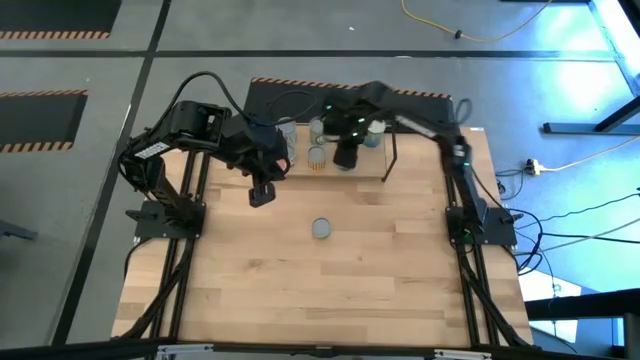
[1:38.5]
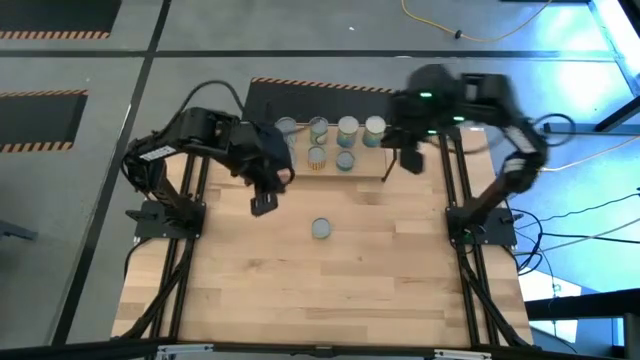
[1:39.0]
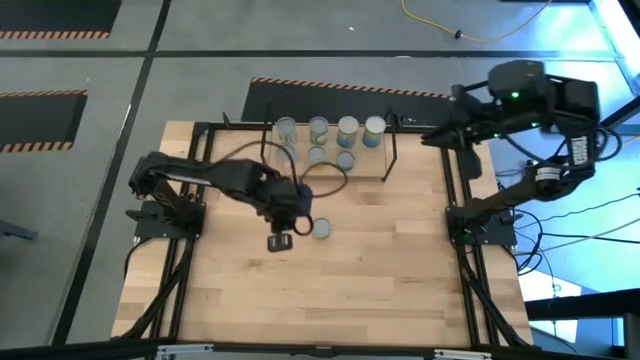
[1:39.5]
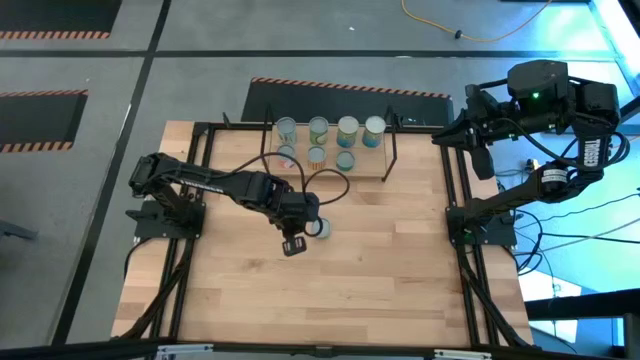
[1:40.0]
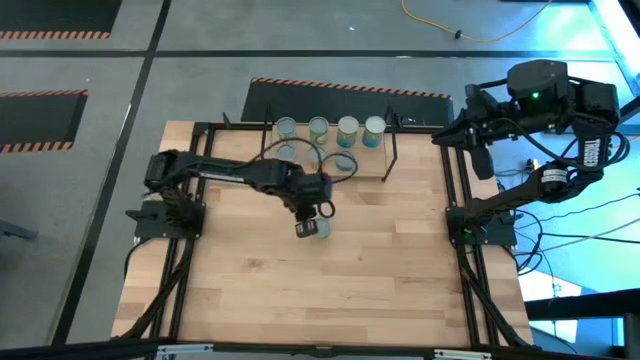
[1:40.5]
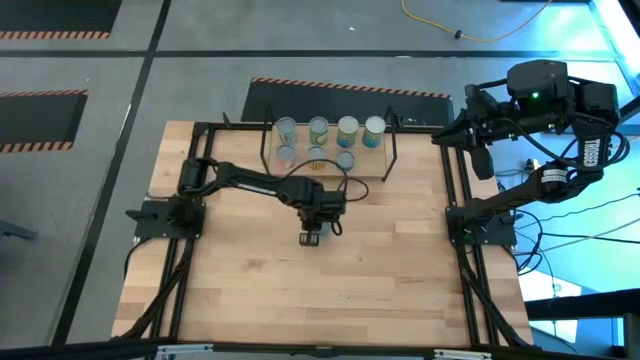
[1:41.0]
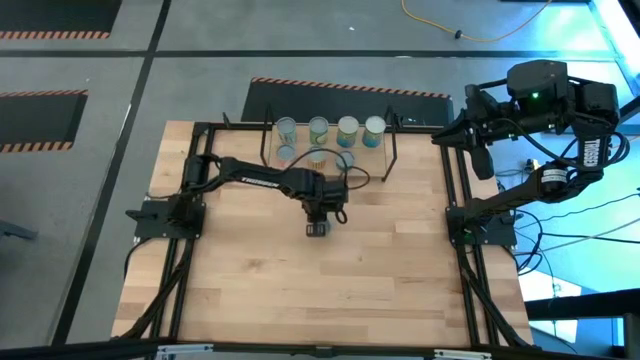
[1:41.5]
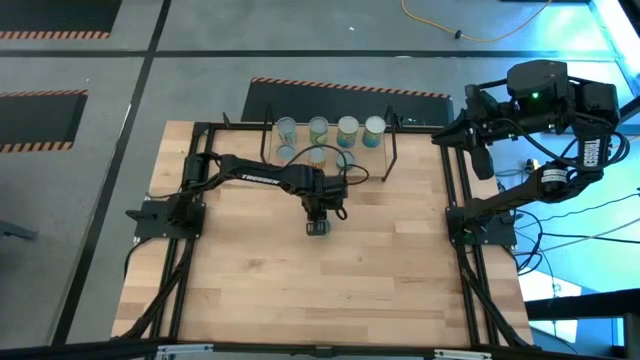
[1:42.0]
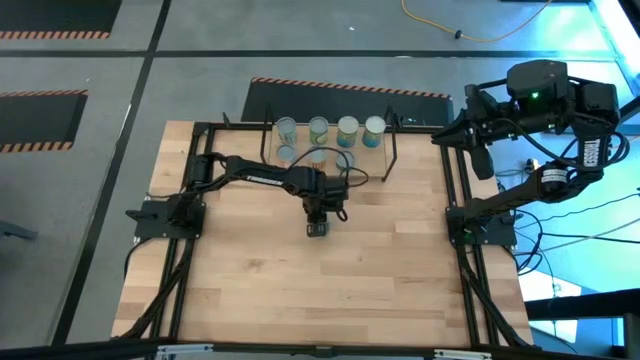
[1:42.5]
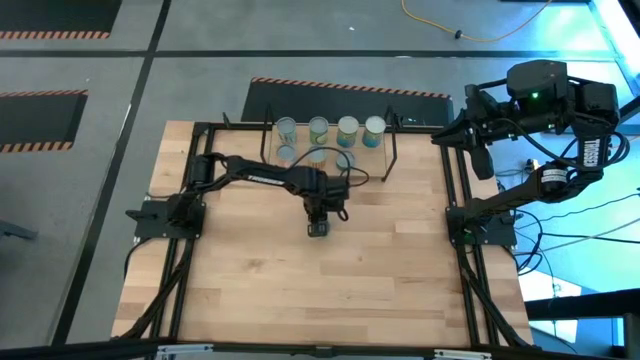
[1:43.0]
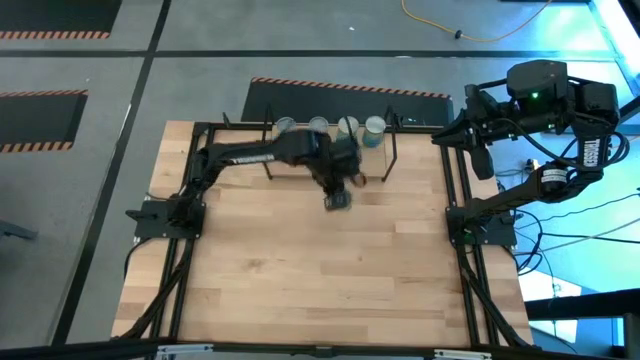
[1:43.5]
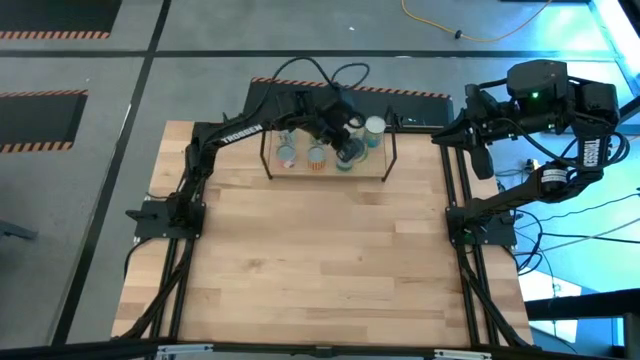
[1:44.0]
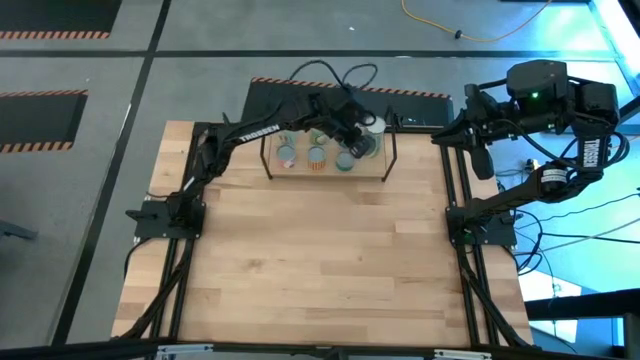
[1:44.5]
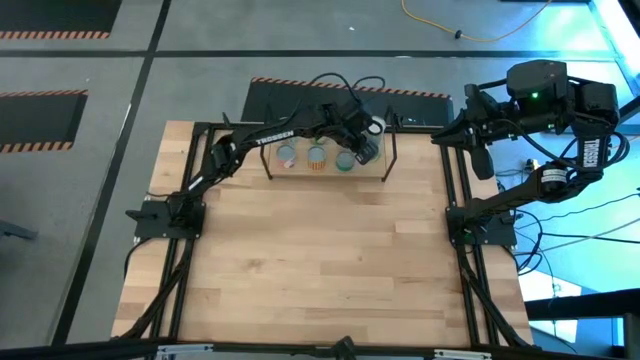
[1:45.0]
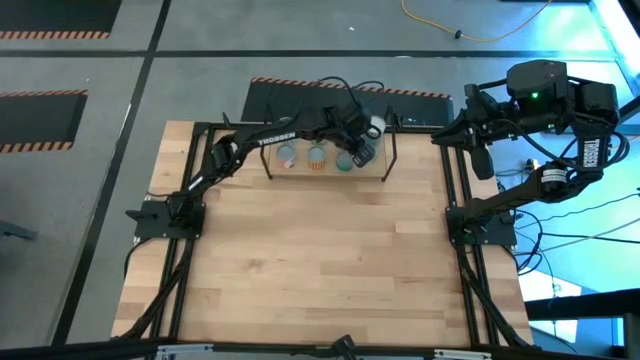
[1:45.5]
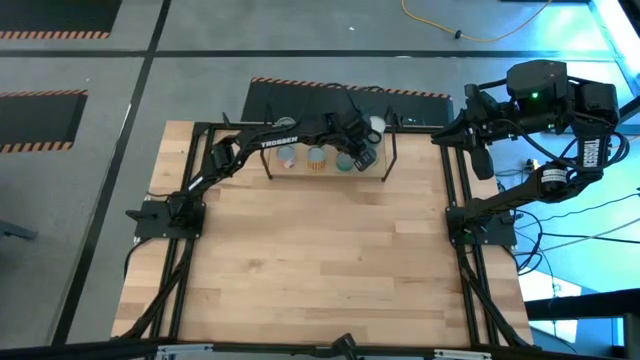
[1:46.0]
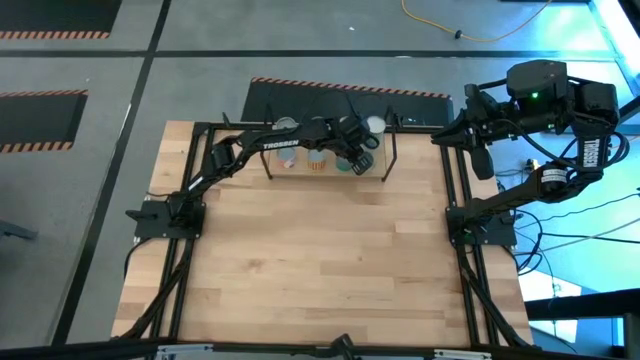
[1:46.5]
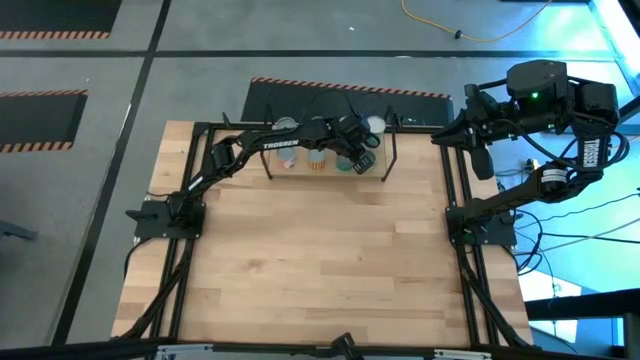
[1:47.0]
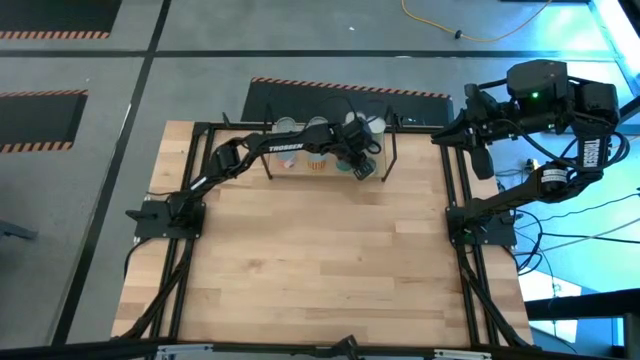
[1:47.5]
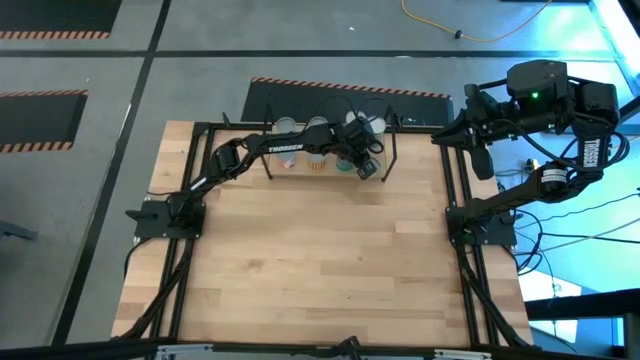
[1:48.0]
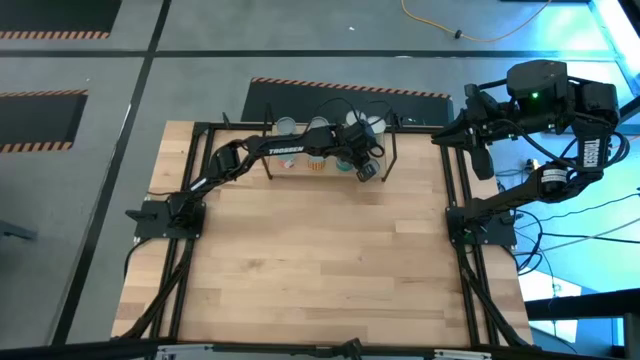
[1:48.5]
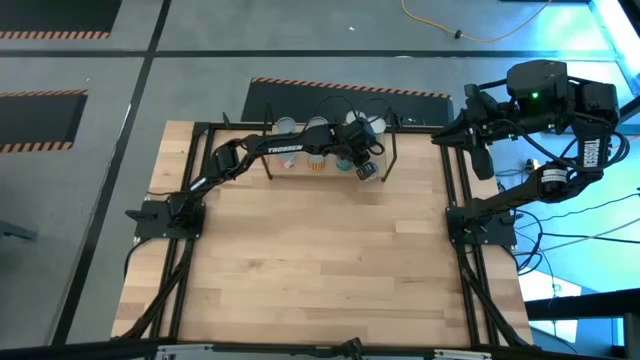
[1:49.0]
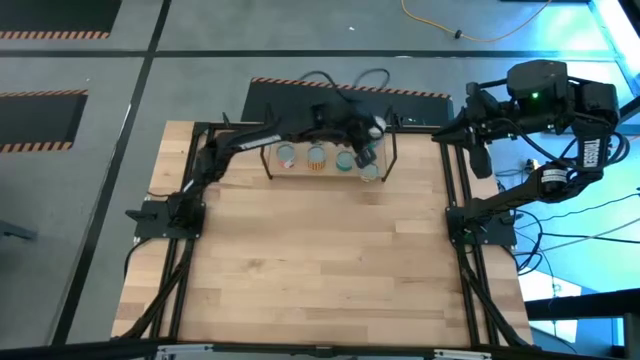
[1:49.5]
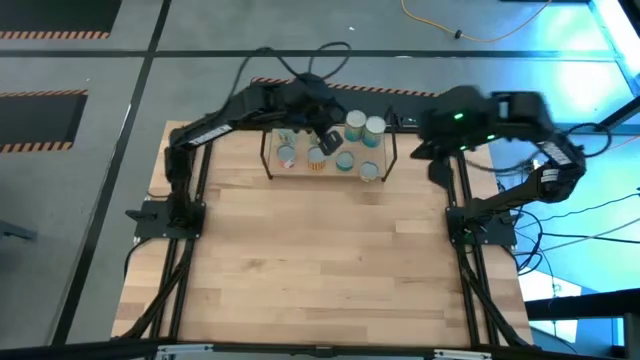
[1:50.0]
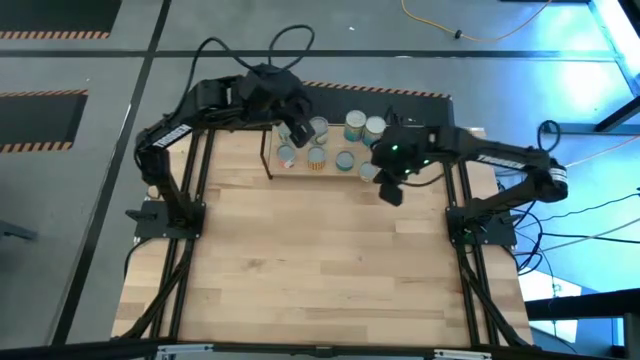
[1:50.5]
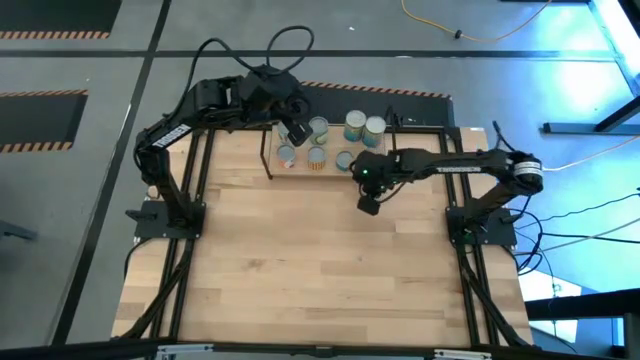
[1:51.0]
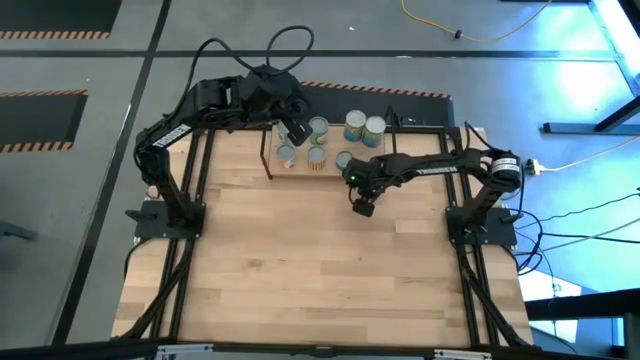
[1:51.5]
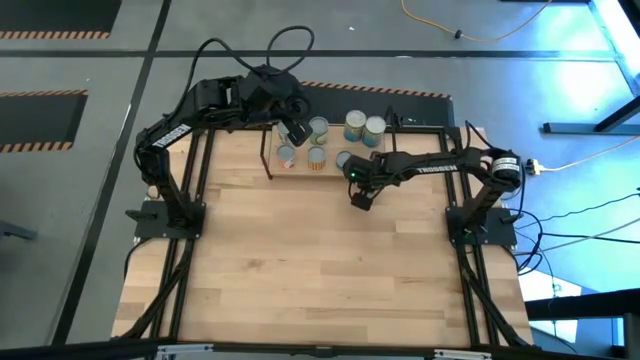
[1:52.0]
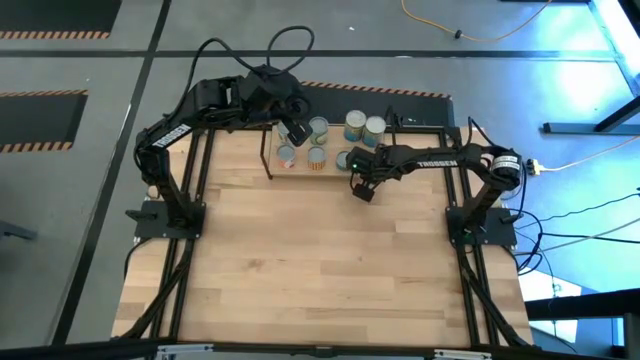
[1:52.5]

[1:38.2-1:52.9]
Task: Pick and place cans onto a shelf
Put the green can on the shelf aligned with the light blue can

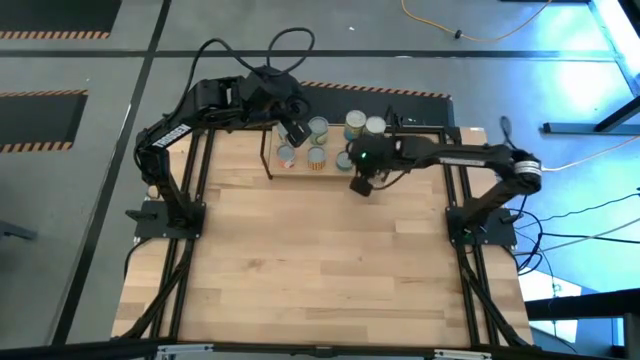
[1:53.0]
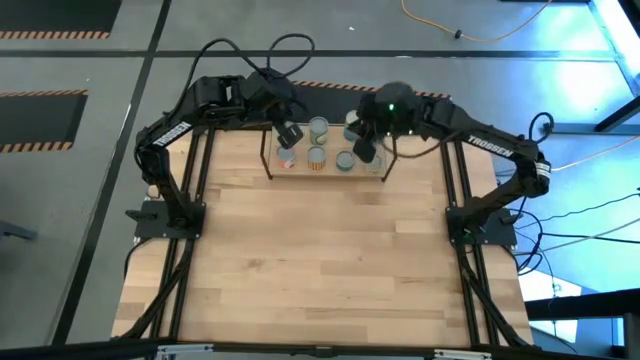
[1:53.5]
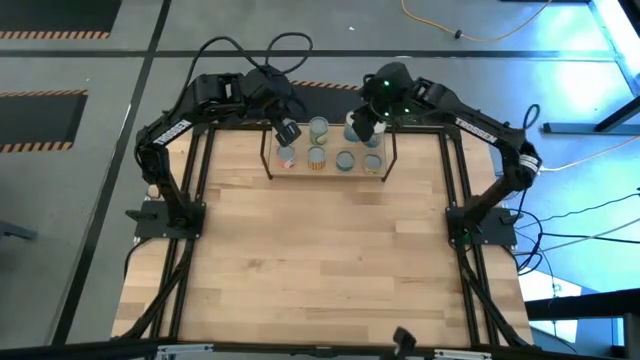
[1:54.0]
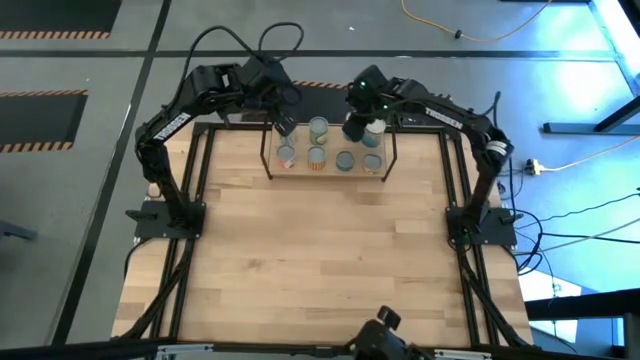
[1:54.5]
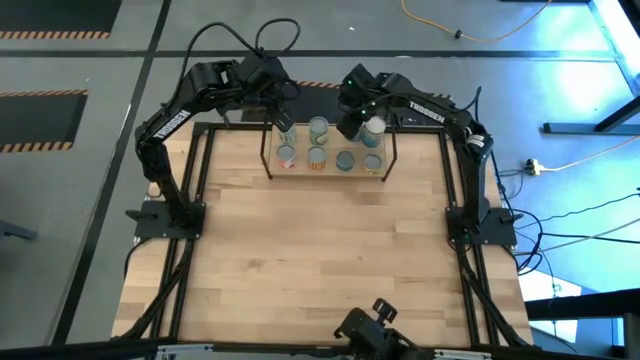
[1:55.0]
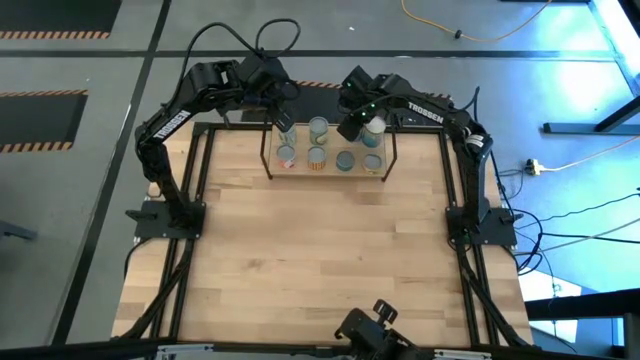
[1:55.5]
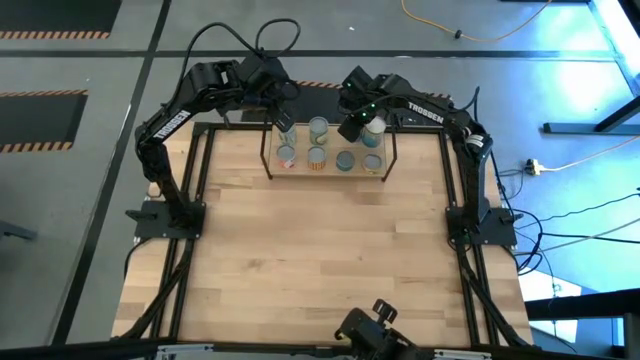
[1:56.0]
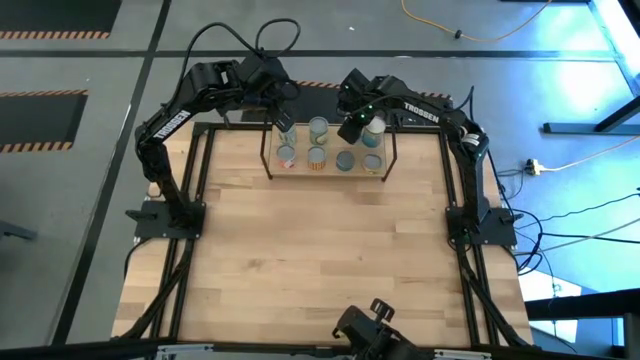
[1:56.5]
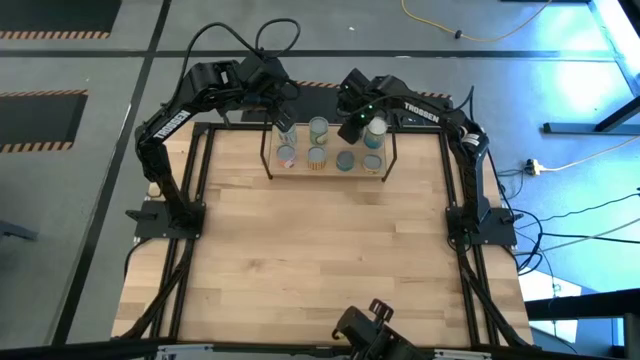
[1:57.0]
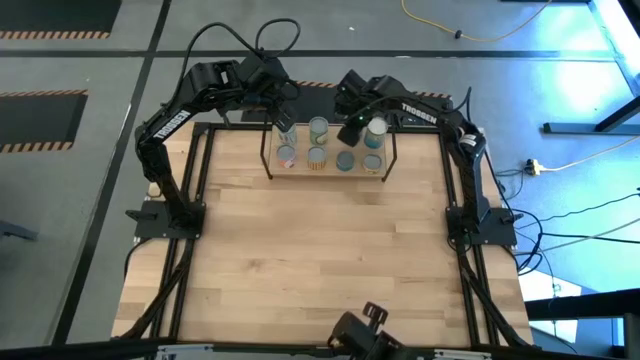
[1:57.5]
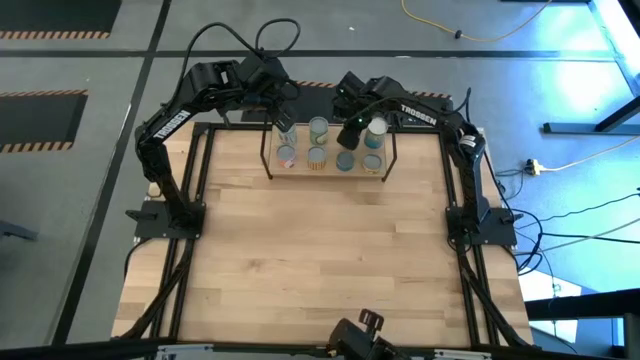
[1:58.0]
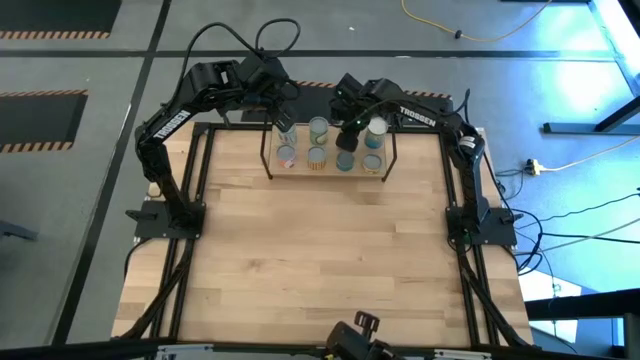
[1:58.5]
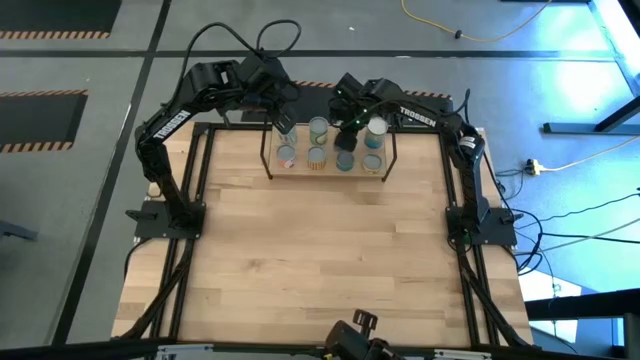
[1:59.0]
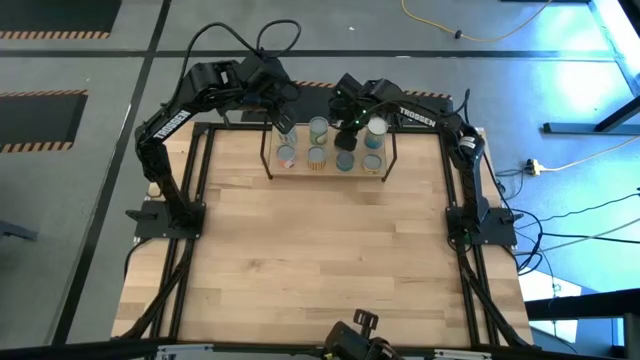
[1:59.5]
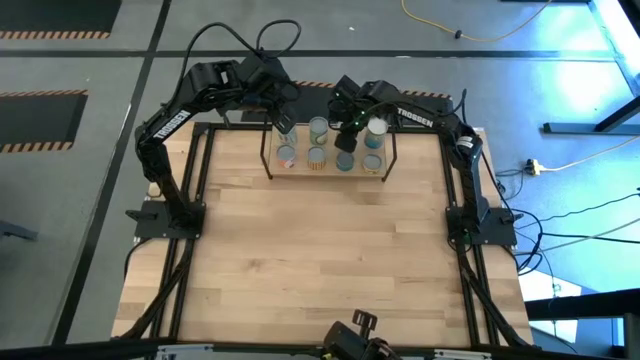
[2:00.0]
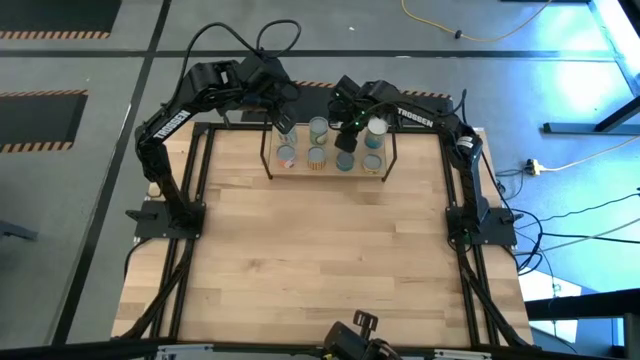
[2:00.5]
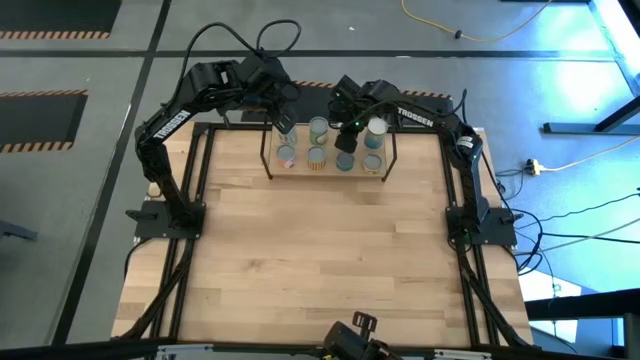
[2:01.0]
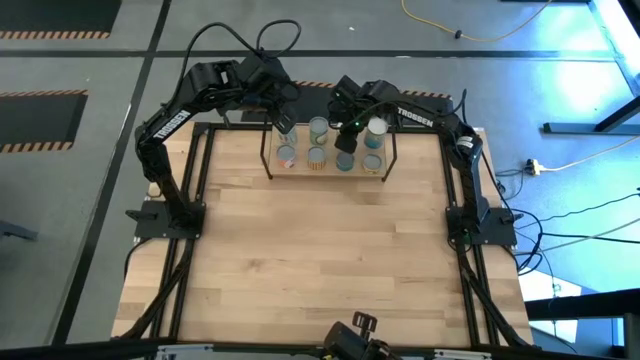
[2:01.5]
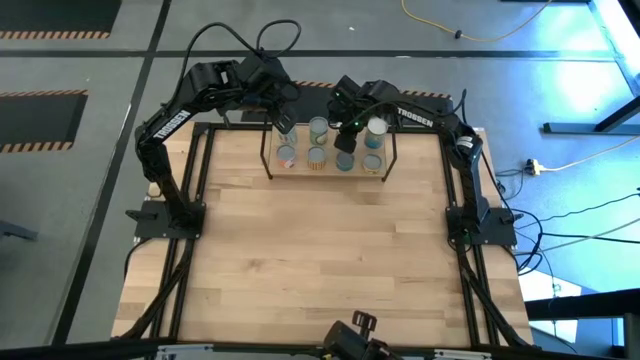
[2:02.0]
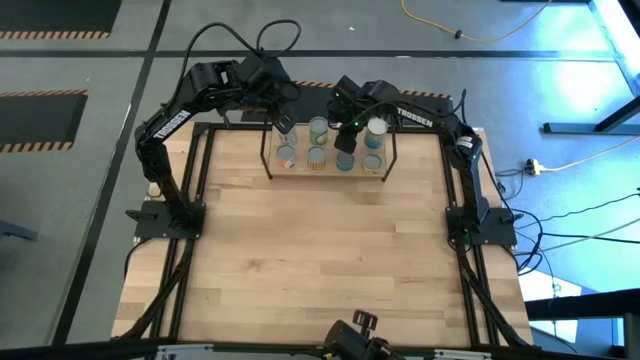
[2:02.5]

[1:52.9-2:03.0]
Adjust the left light blue can
